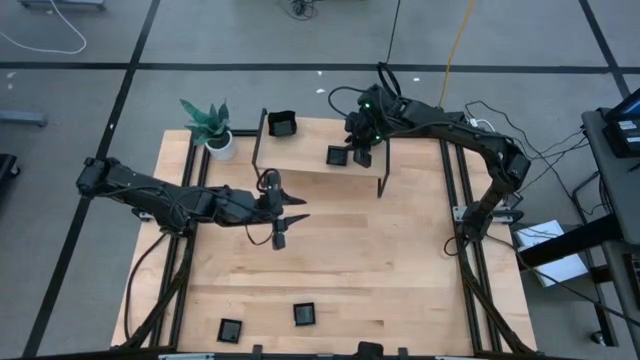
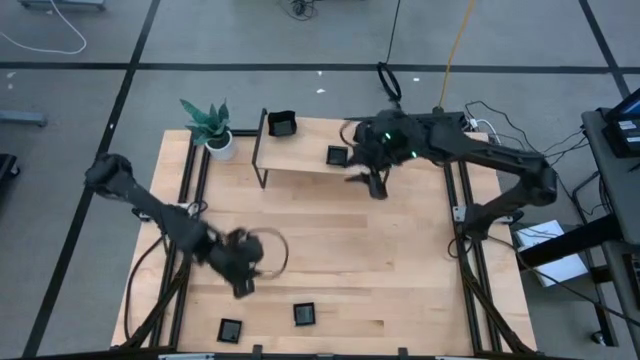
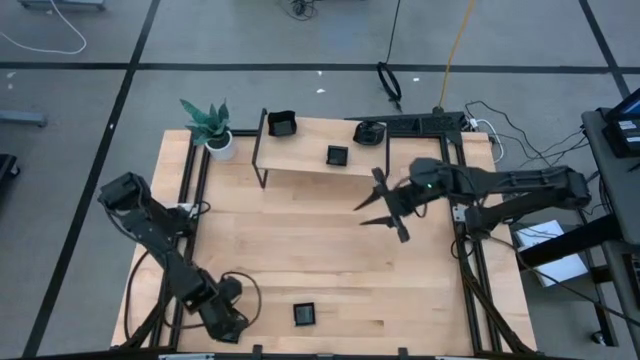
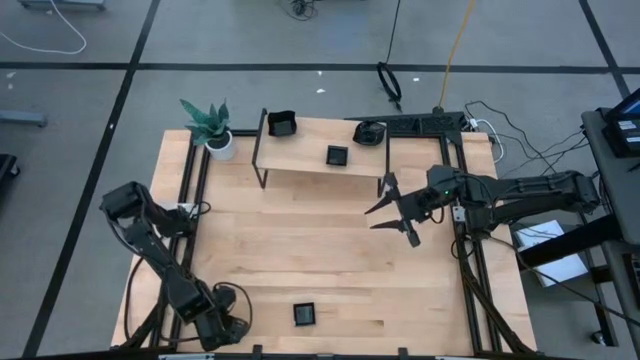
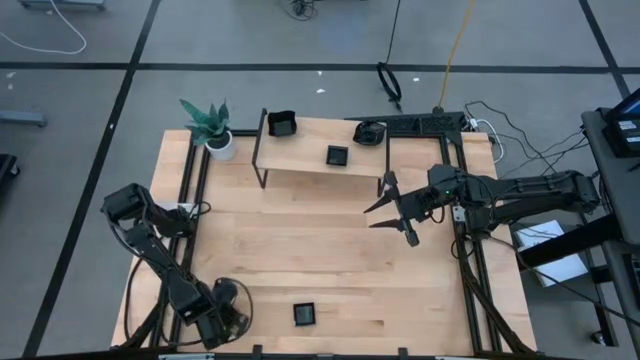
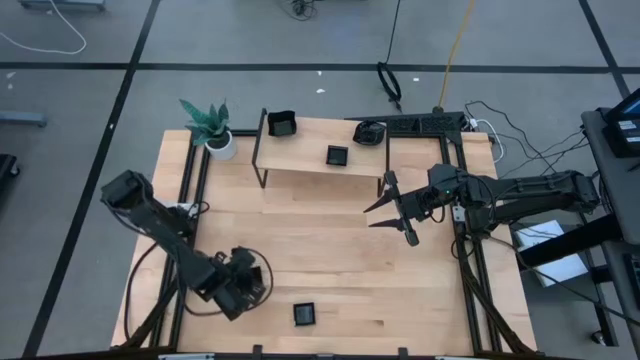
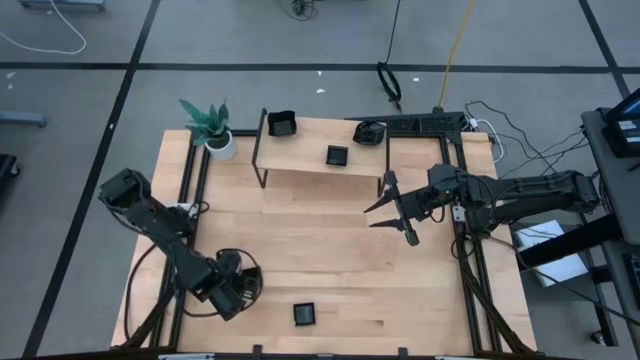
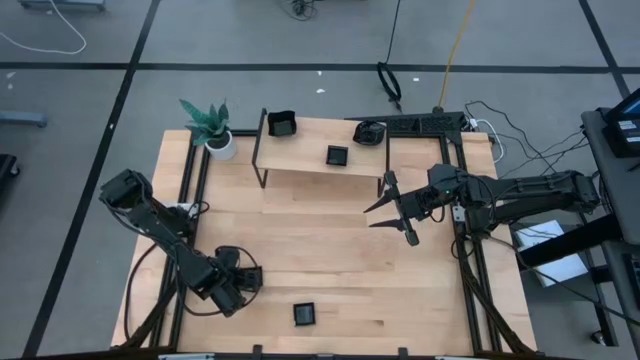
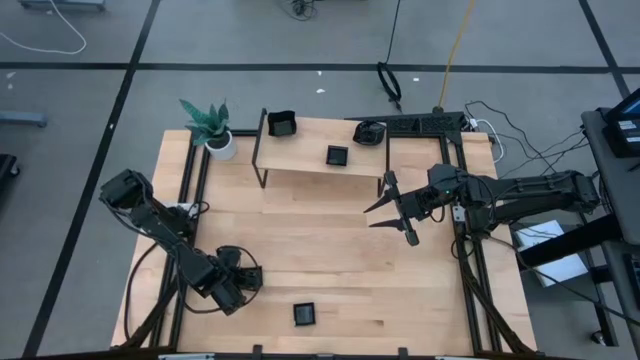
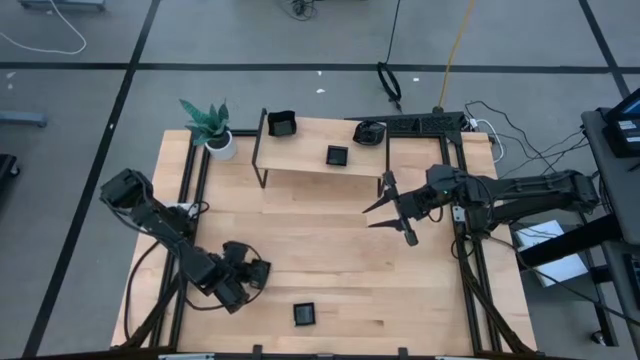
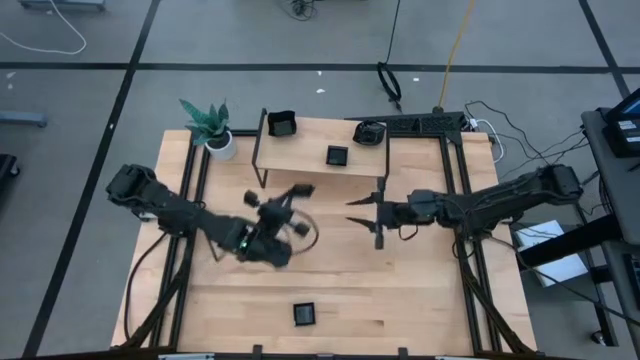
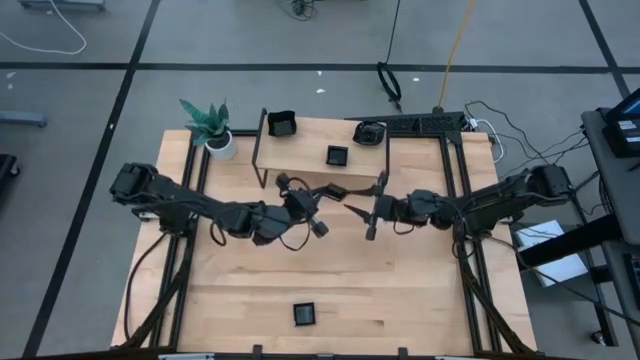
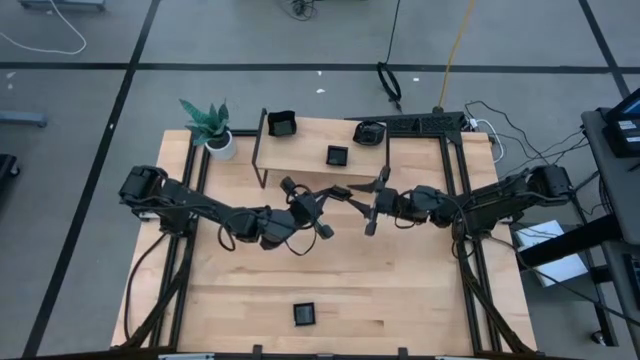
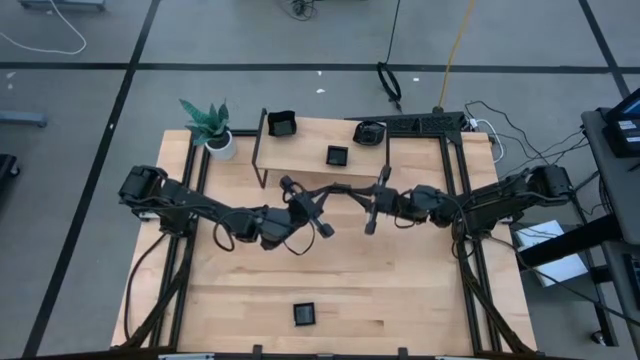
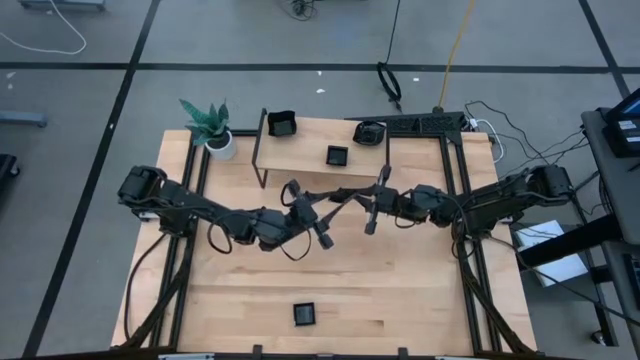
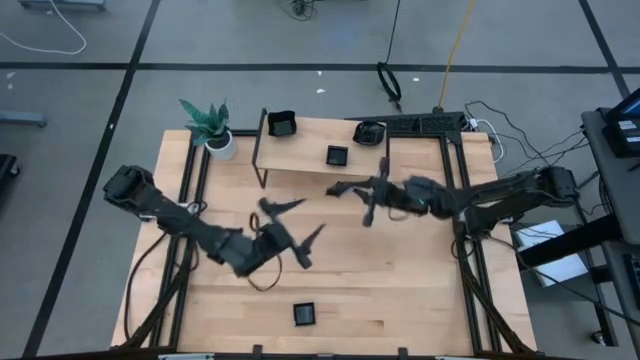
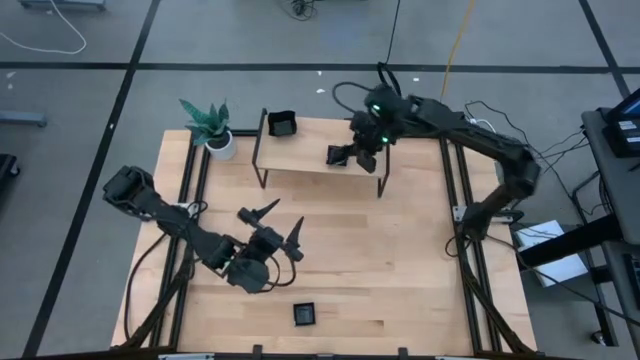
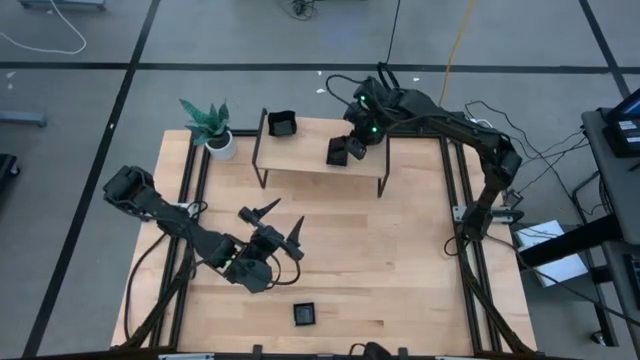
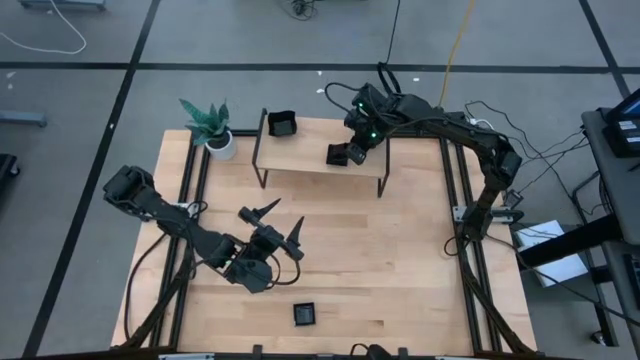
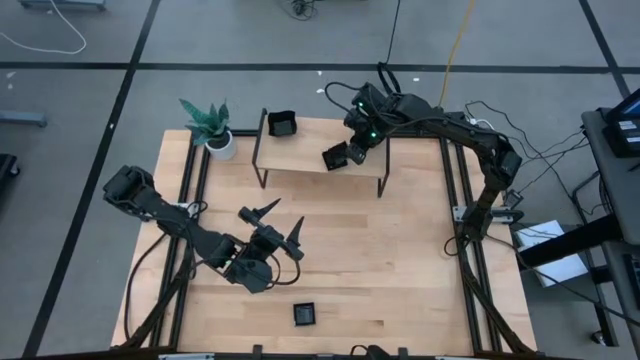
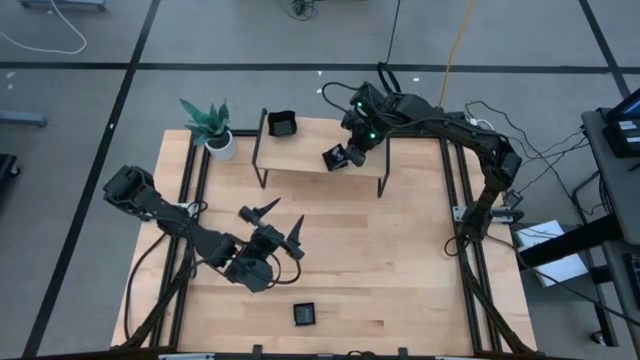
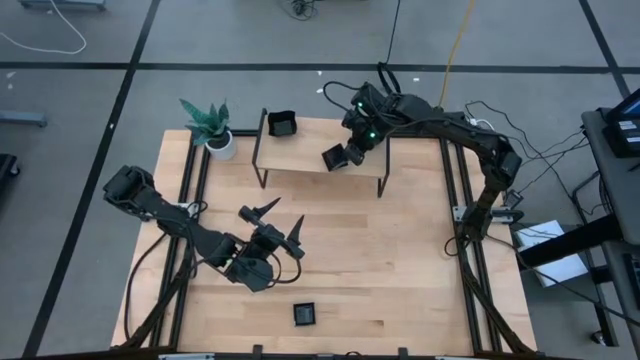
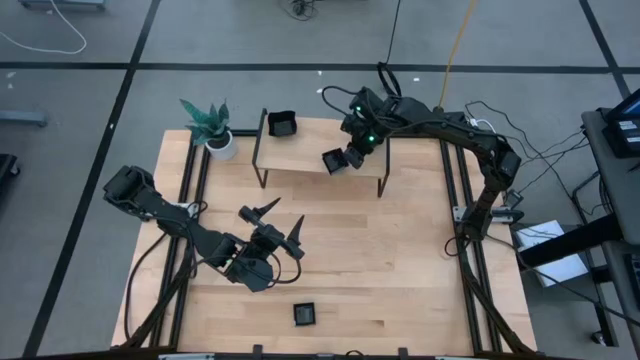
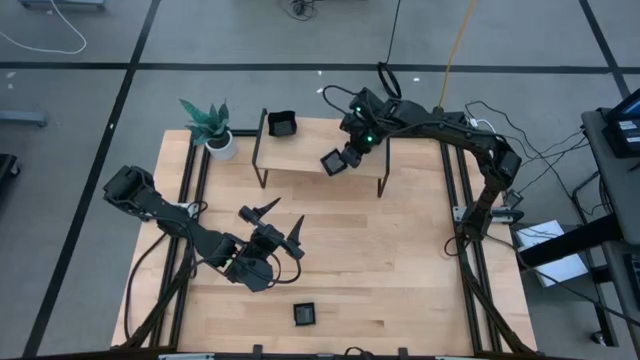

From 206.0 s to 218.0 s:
Task: Pick & Place Mini shaped plates
Stack the black square plate on top of the other black square plates on the shelf

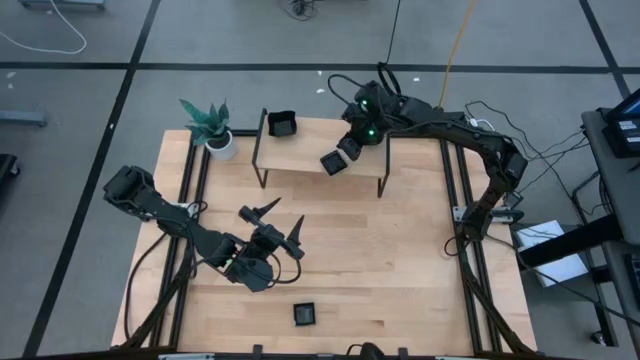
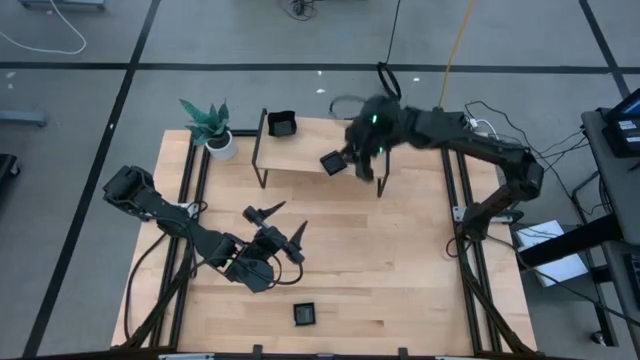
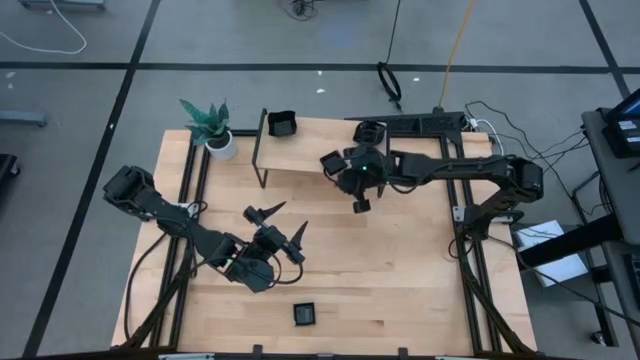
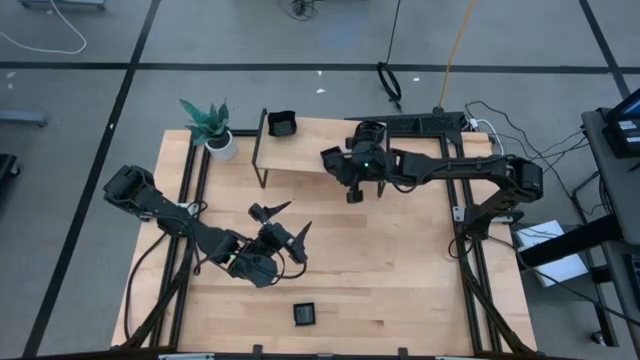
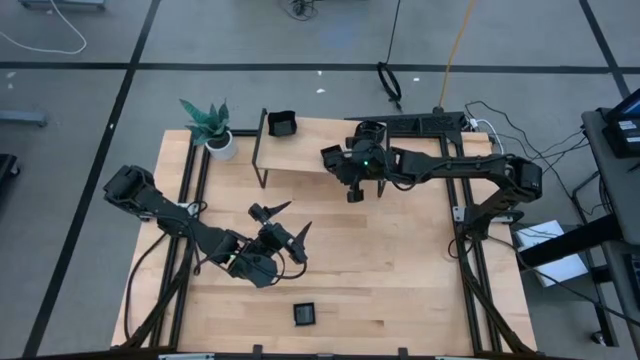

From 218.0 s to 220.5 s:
Adjust the stacked black square plates on the shelf

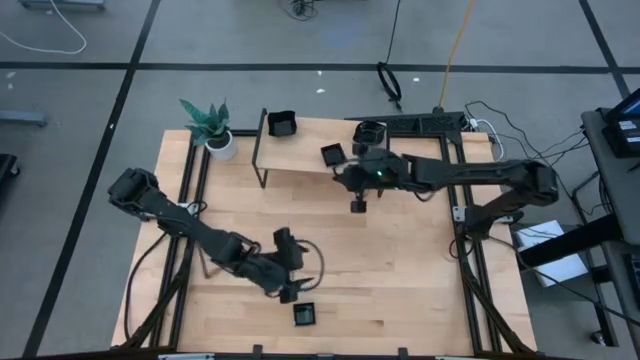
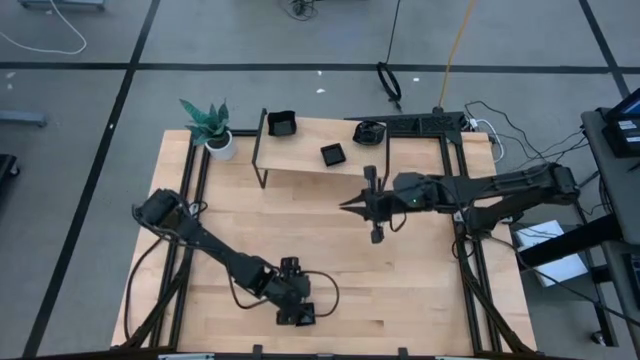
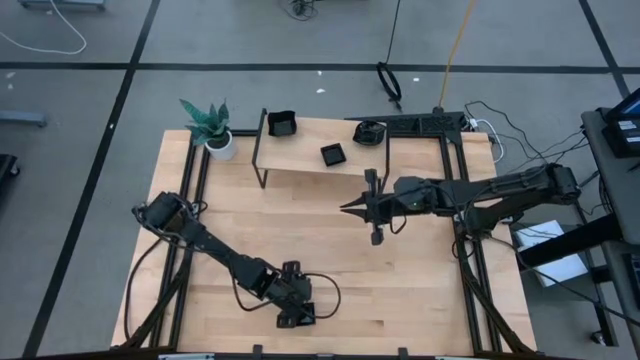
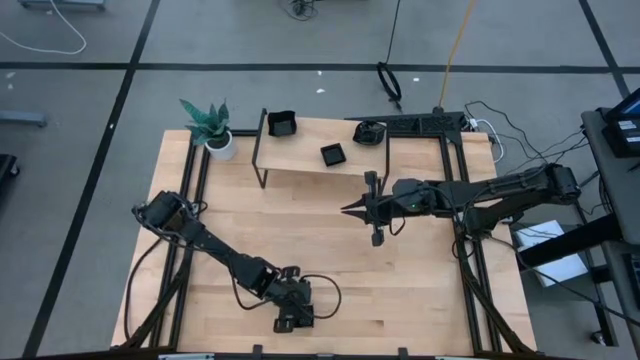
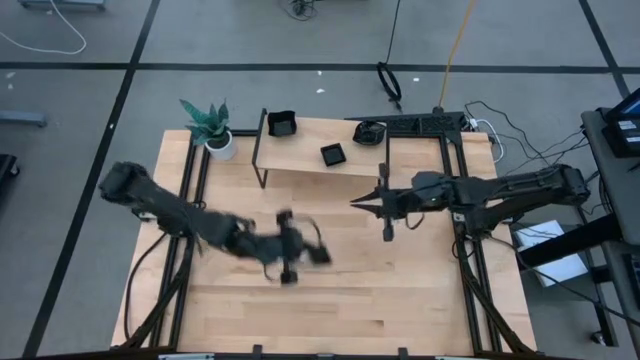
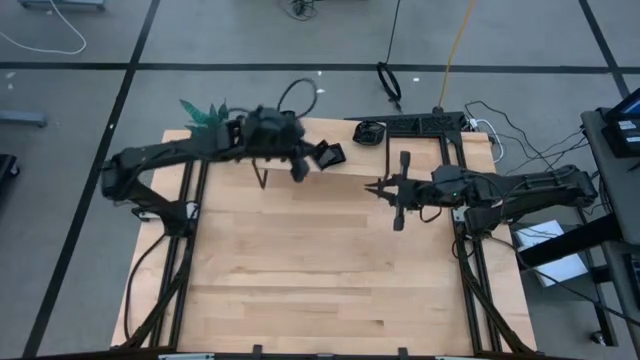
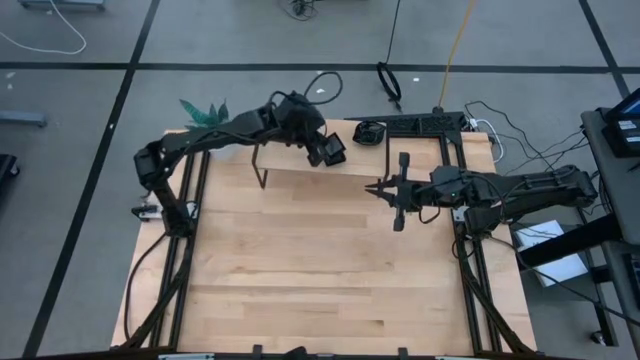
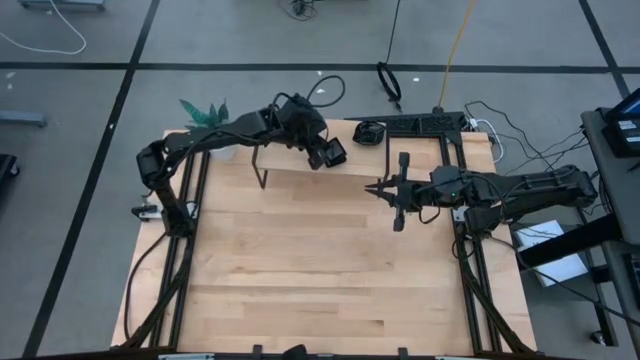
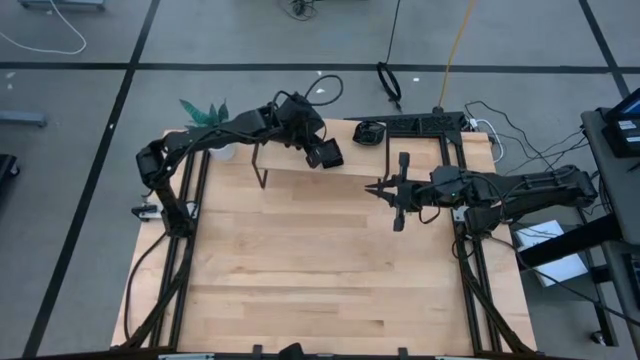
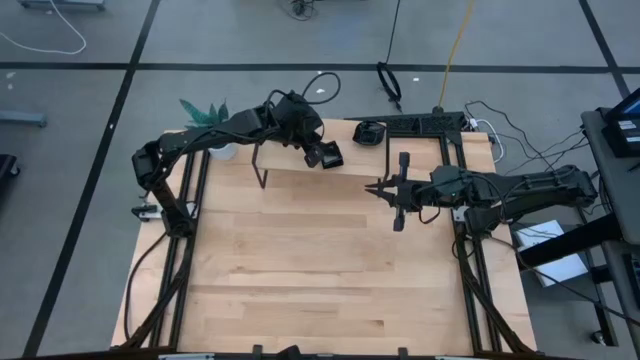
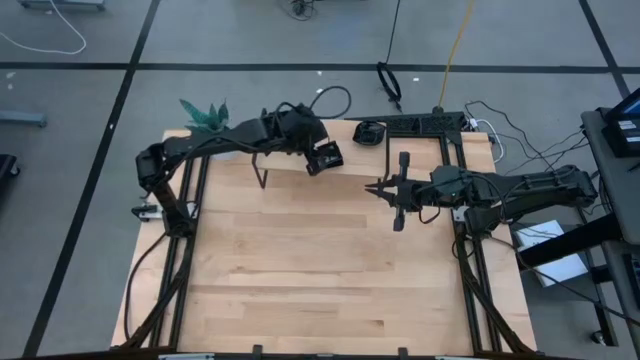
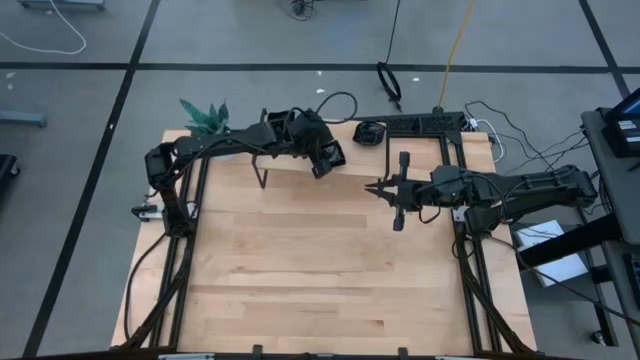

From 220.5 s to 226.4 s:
Stack the black square plate on top of the other black square plates on the shelf

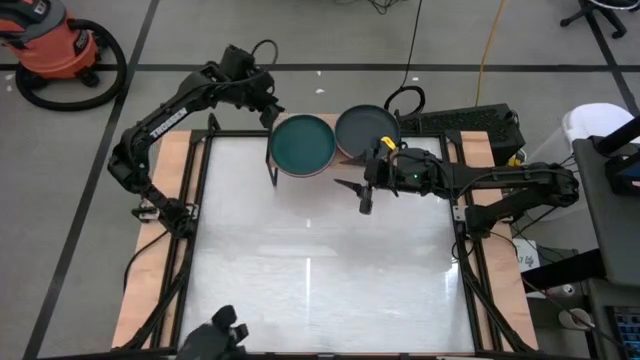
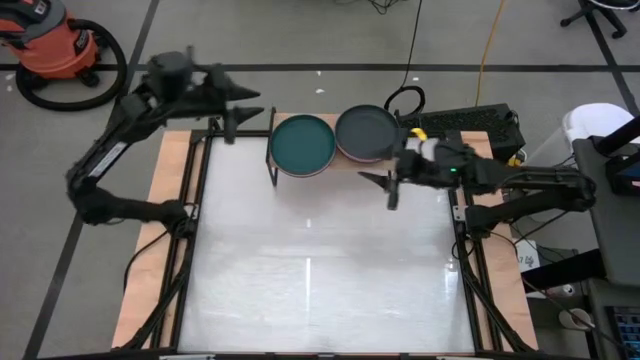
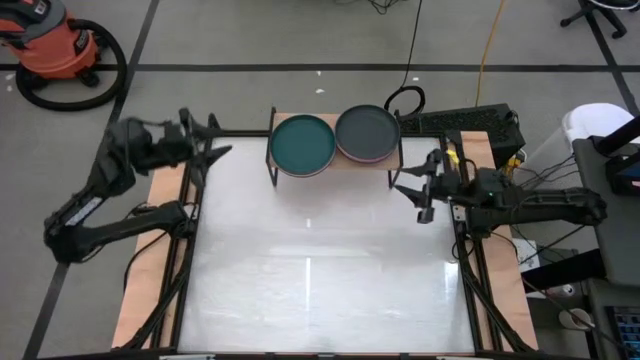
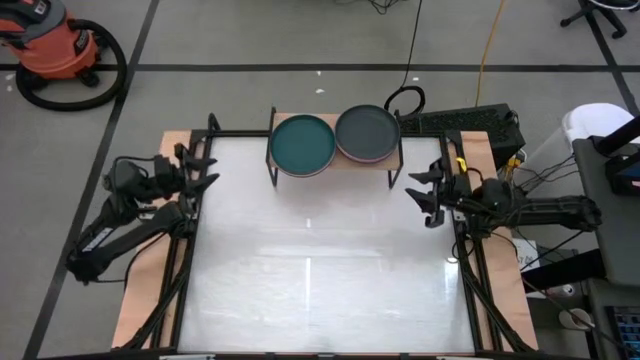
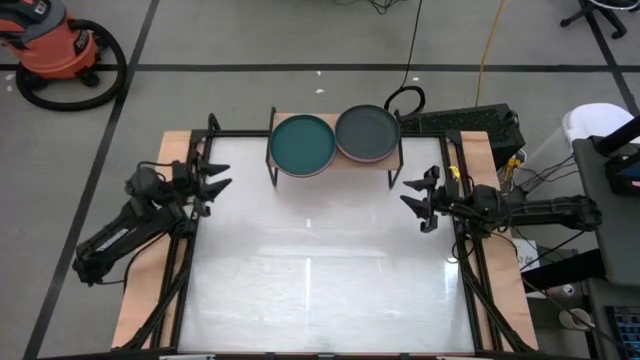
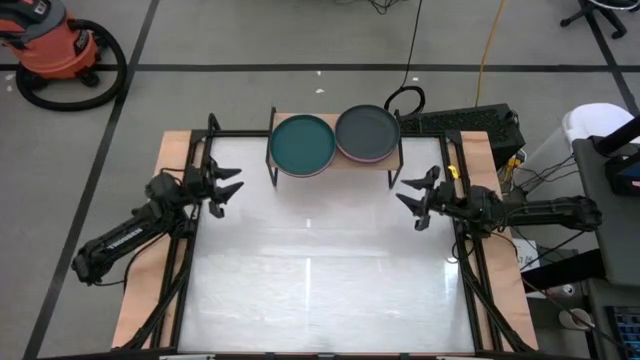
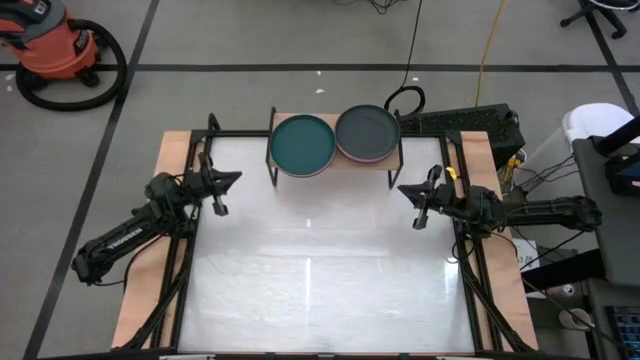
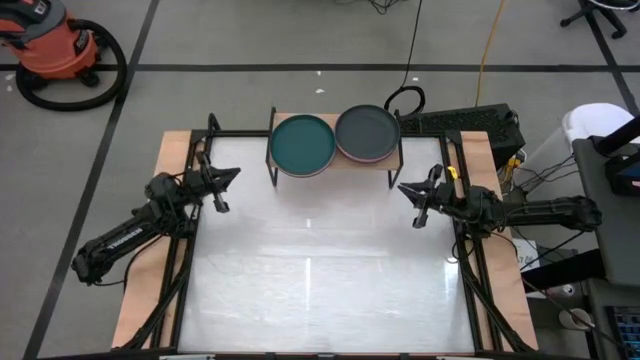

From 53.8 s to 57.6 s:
Task: Place and stack plates onto a shelf
Return to Home Position
